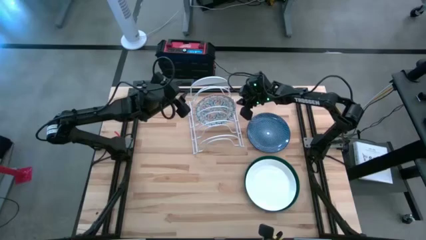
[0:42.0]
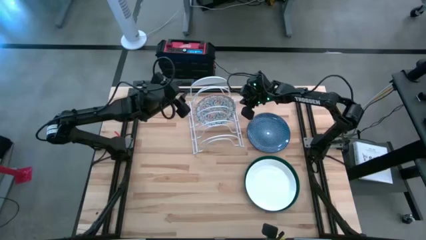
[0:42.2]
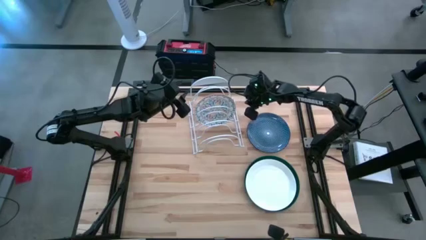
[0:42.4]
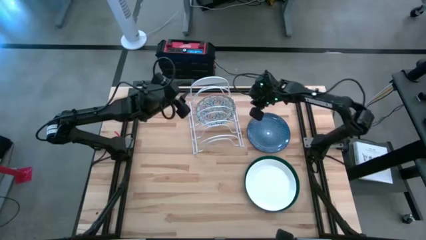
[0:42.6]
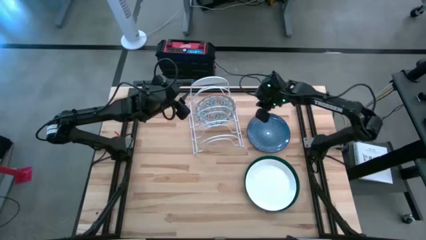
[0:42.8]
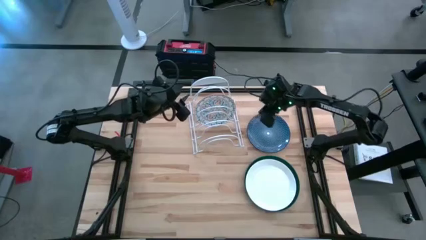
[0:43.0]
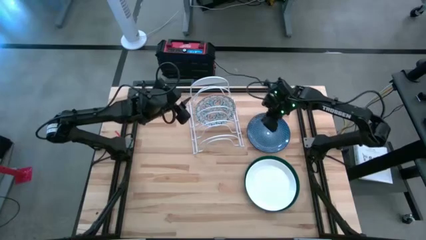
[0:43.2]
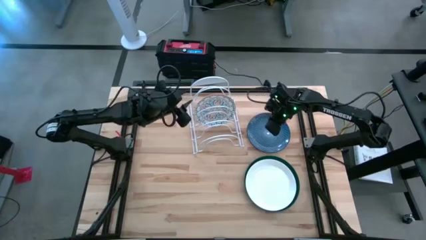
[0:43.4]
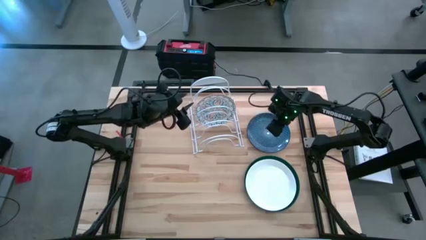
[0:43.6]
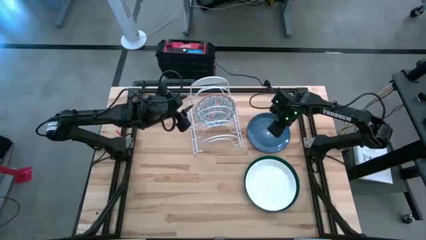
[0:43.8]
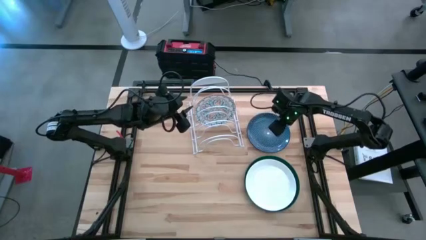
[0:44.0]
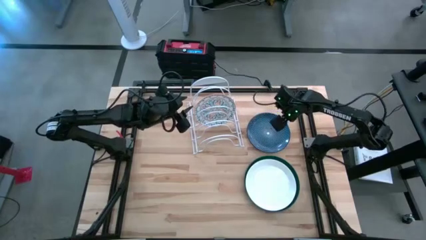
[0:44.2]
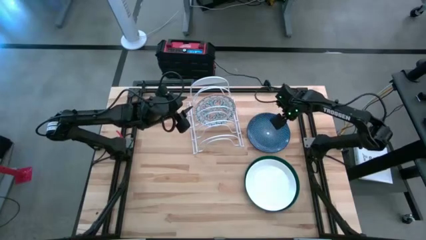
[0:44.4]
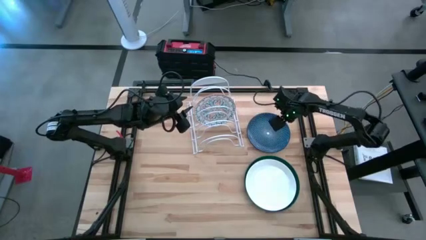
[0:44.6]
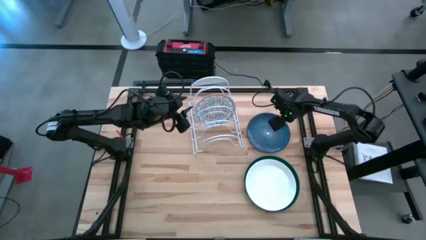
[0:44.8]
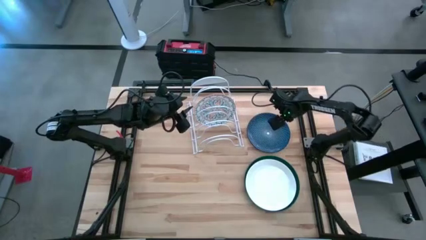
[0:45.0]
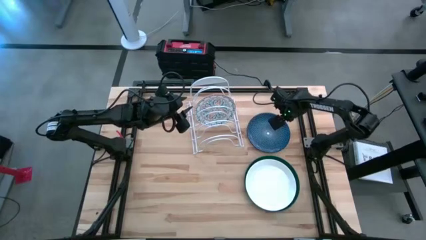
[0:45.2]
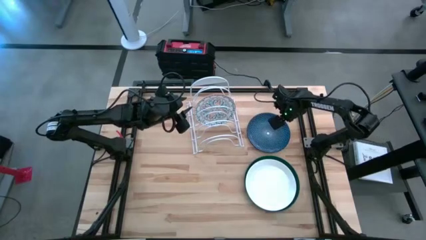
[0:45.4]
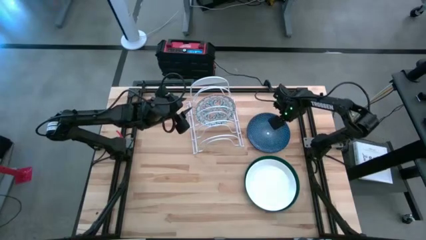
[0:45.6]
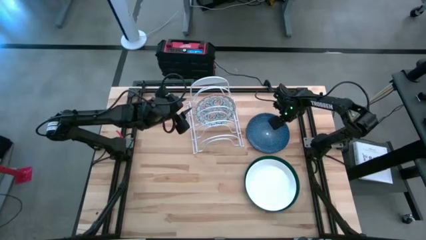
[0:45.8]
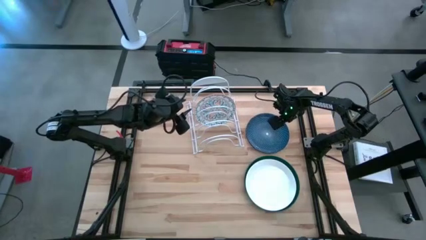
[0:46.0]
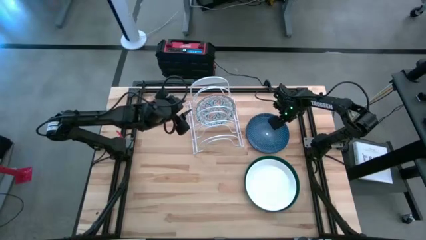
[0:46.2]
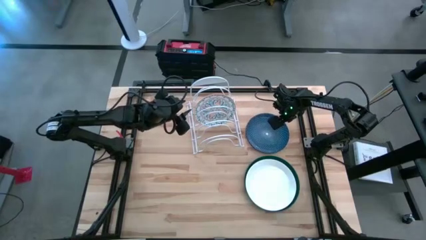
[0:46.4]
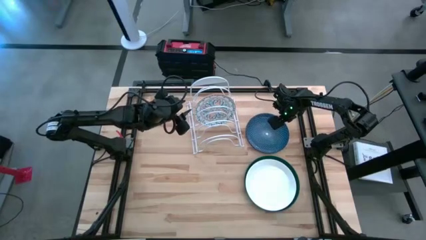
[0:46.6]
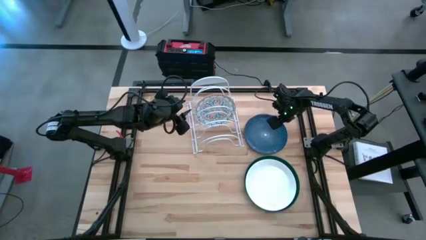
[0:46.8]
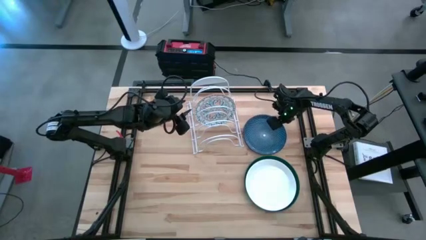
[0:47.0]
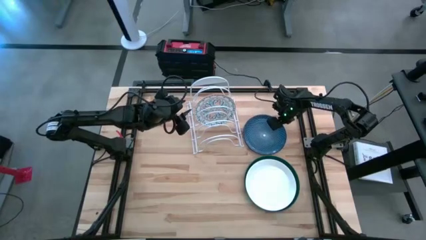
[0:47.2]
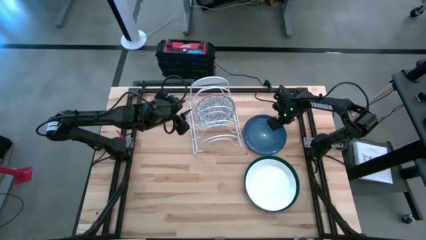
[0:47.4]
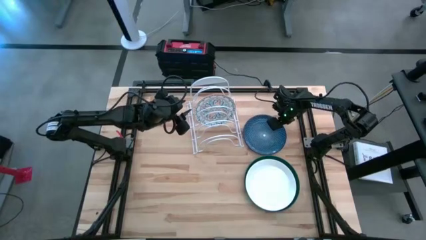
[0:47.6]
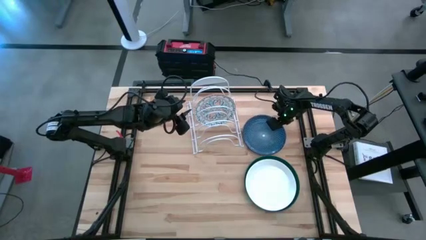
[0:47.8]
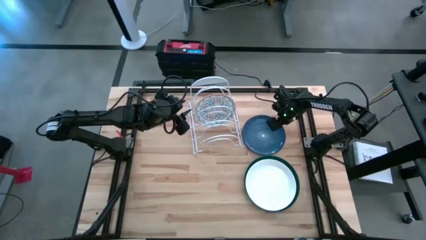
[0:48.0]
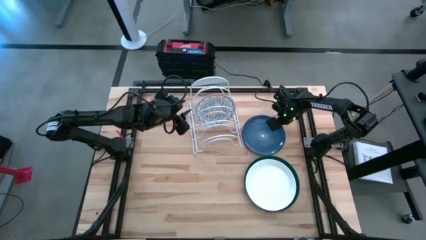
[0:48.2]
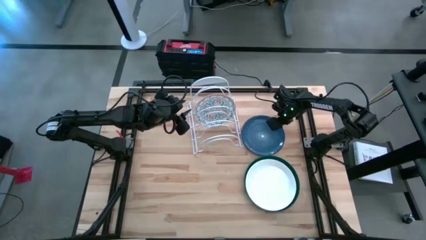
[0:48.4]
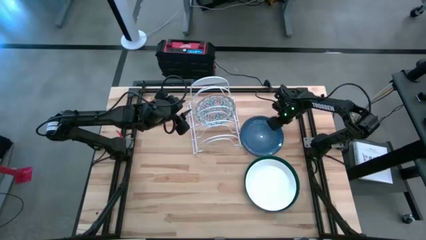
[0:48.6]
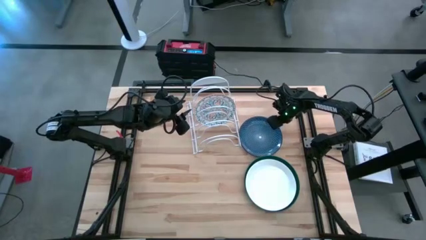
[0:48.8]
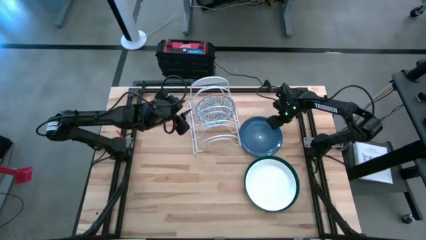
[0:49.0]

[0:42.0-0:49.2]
Task: Sort dishes
Put the blue patterned plate into the dish rack

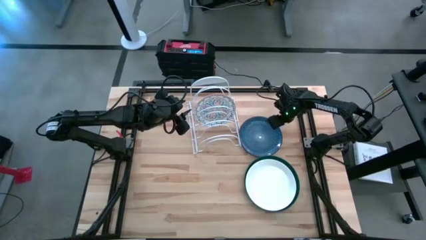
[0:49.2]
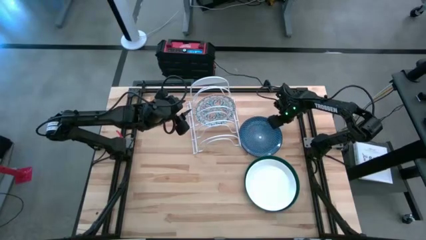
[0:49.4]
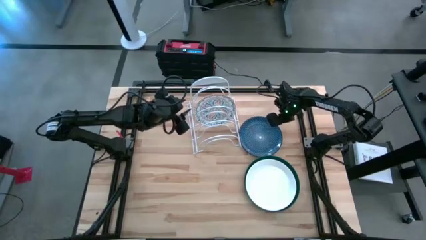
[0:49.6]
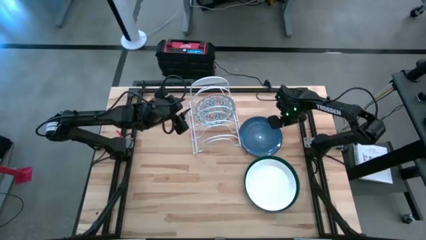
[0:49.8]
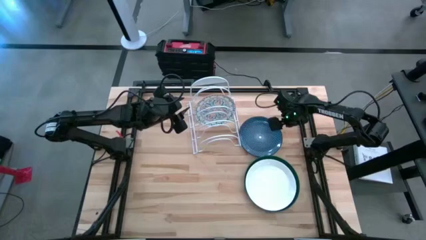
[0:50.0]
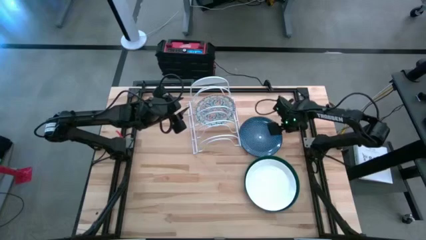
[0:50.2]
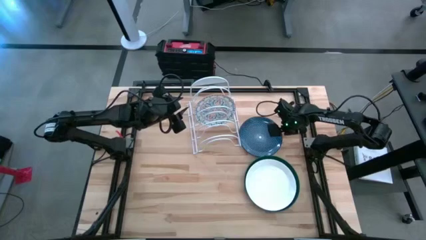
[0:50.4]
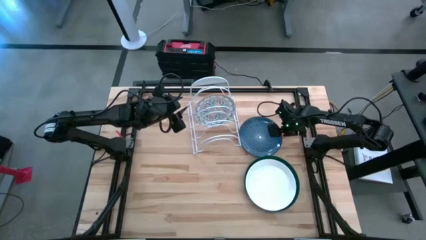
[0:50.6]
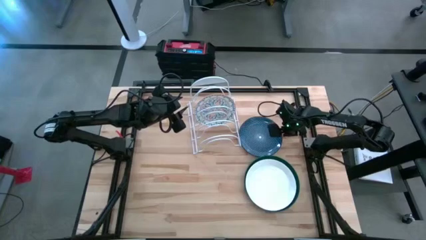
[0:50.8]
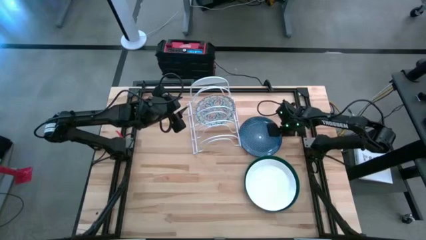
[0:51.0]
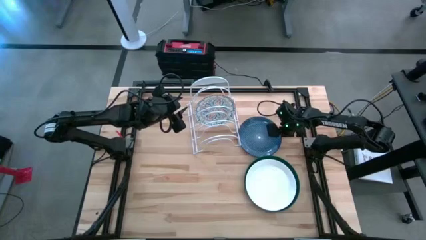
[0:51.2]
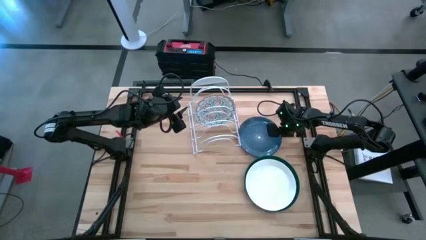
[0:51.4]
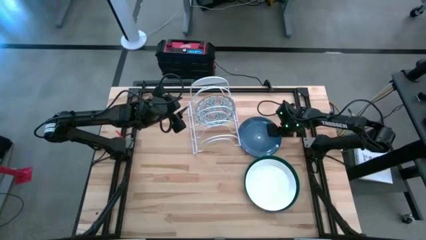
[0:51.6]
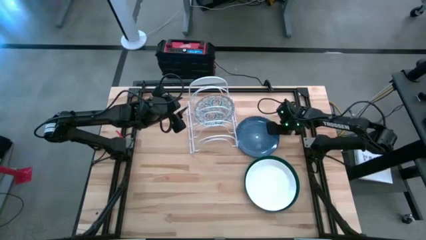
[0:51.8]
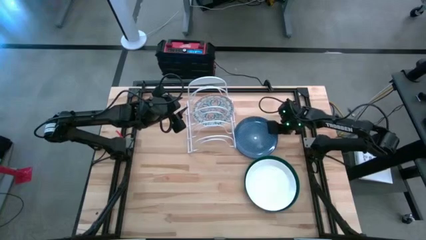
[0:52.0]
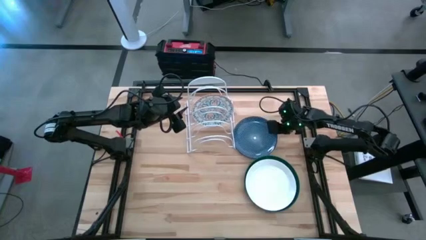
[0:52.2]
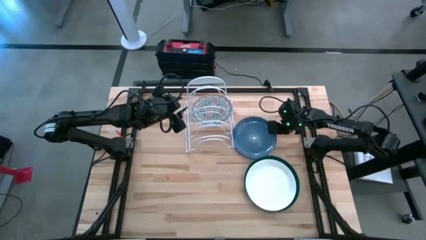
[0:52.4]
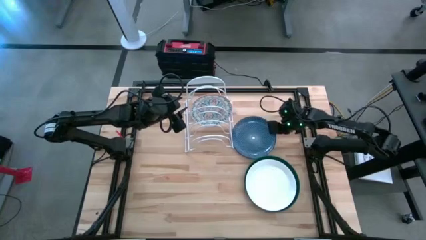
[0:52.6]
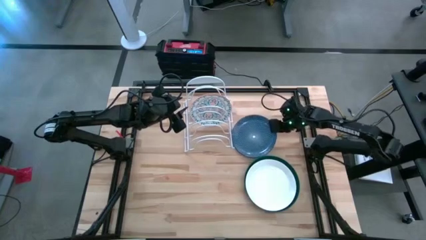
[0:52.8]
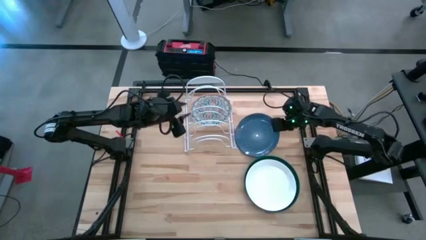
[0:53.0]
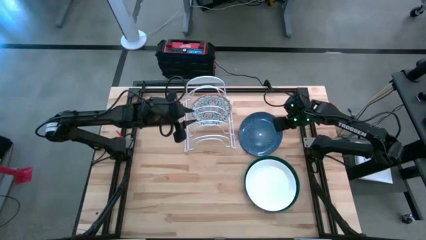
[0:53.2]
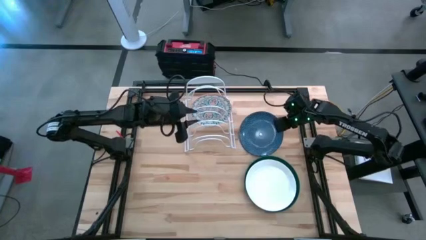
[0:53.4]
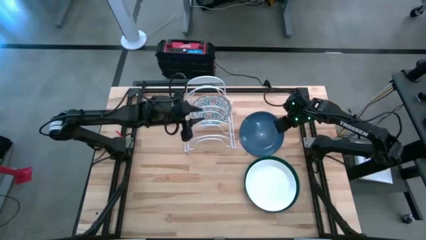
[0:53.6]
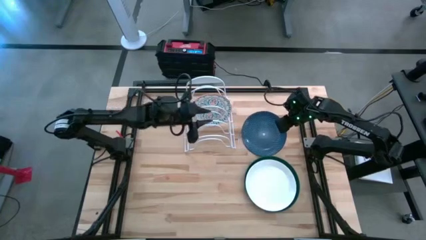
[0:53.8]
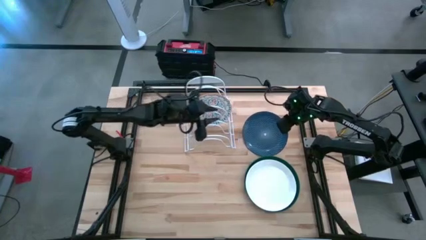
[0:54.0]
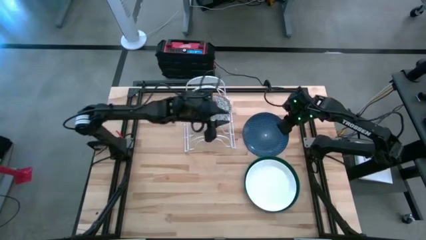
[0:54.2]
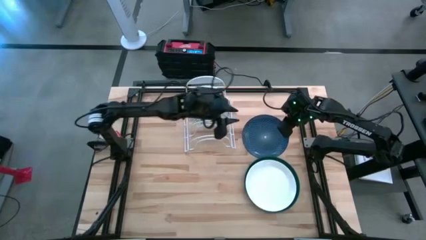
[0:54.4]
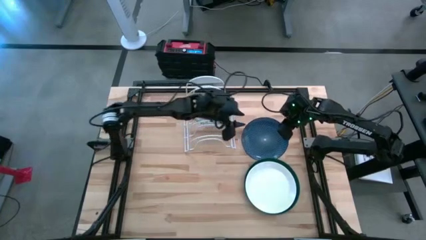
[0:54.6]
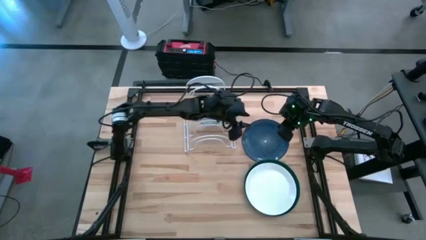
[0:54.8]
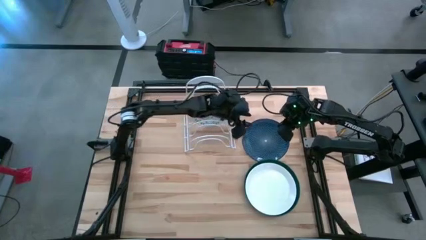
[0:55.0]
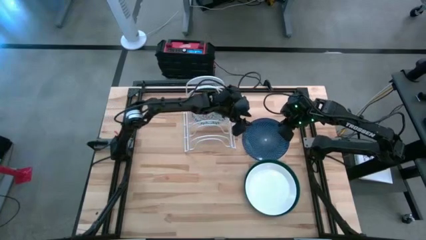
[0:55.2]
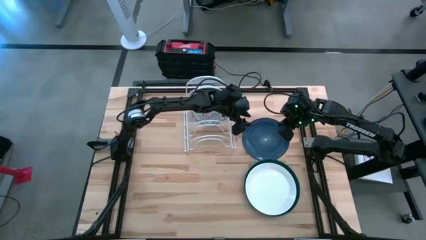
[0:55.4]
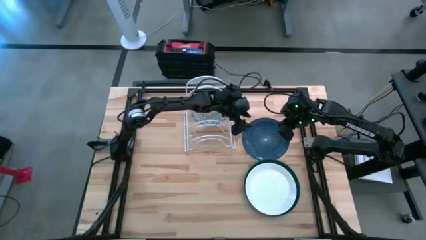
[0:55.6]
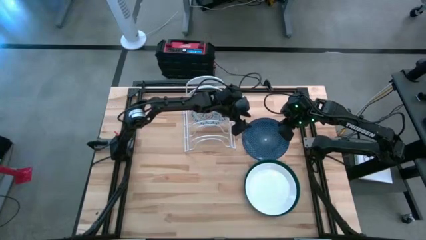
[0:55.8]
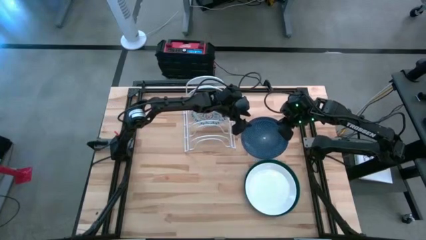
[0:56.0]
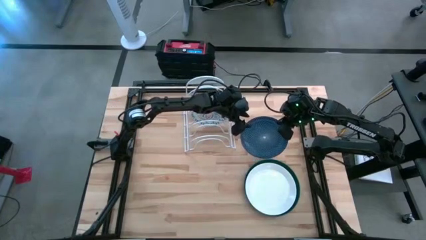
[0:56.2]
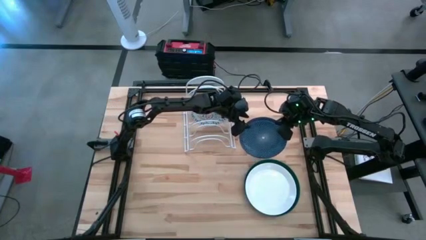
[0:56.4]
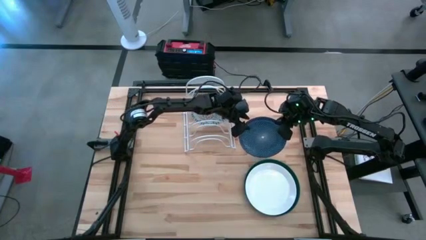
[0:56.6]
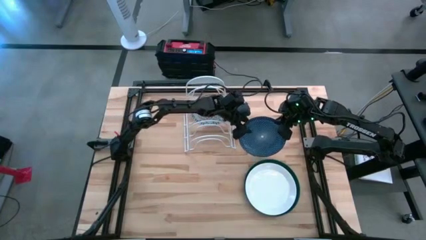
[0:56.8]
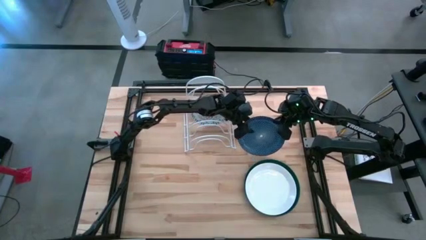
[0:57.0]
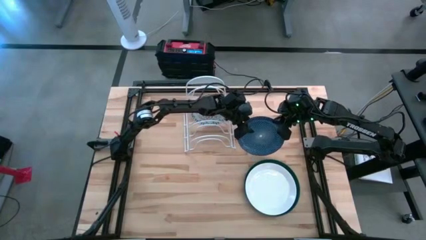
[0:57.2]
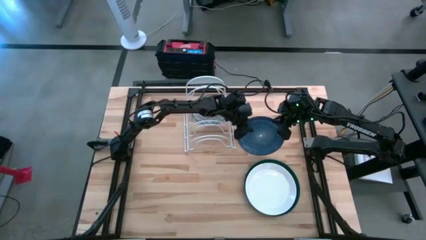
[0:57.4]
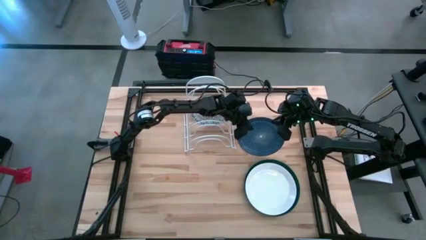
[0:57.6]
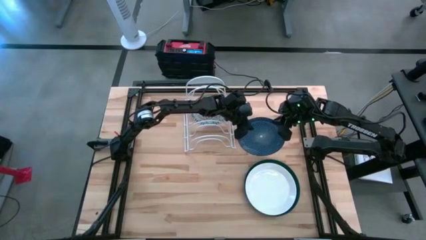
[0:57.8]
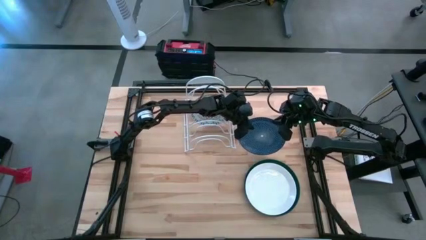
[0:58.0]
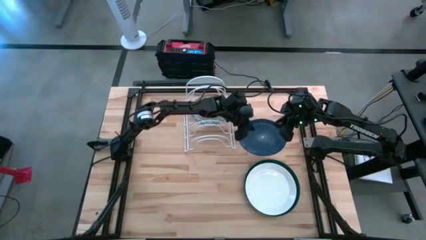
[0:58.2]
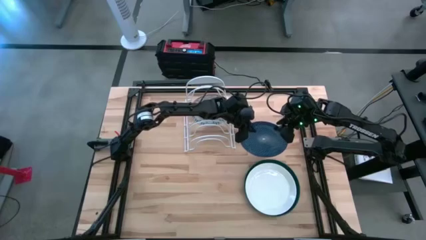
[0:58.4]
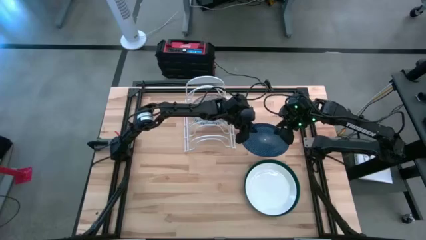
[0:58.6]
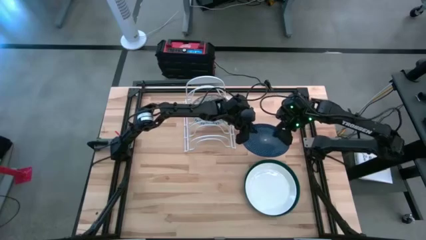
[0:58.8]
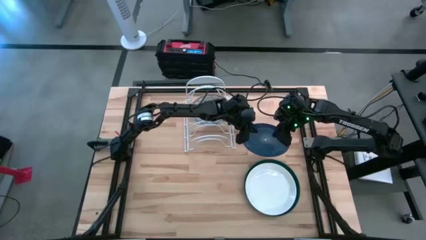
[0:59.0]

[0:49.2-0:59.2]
Put the blue patterned plate into the dish rack

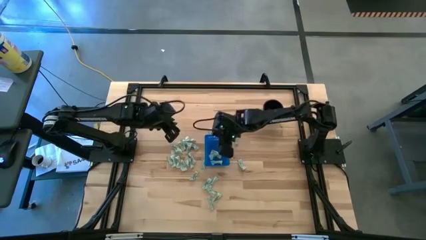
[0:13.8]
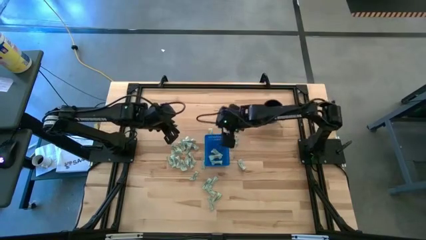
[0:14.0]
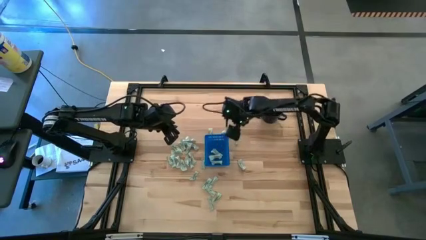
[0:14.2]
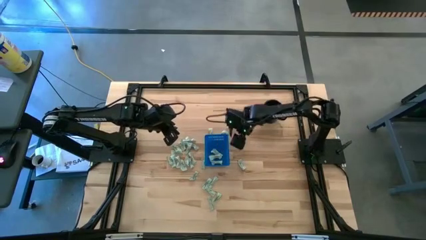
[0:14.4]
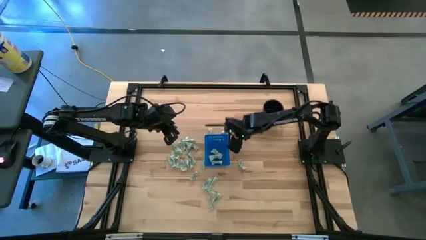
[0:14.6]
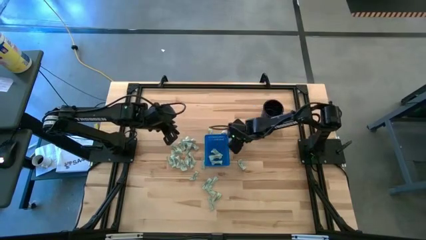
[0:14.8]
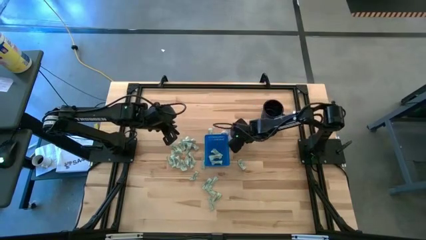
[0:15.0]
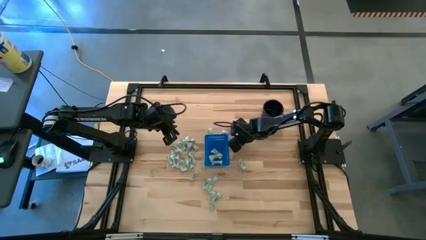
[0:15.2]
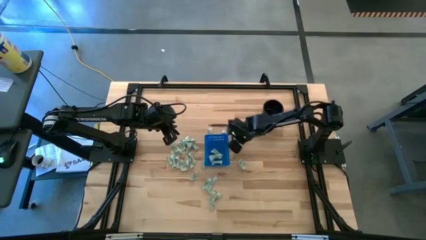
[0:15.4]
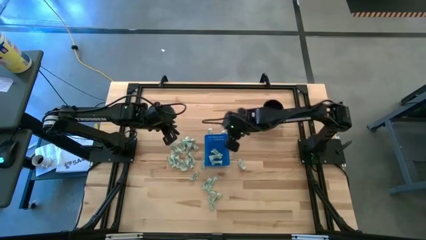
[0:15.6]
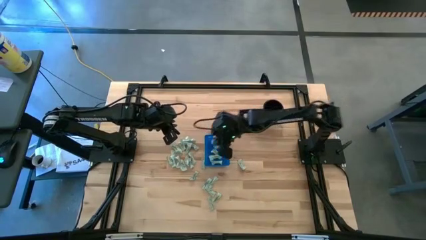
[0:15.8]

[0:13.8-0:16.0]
Task: Pick and place Stevia / Truvia into bins
Put the stevia packet into the basket
